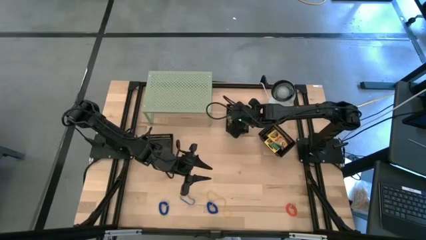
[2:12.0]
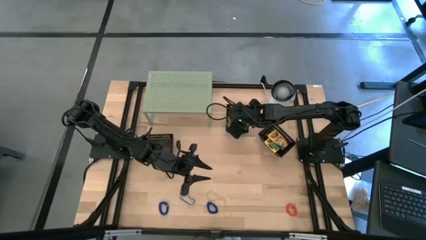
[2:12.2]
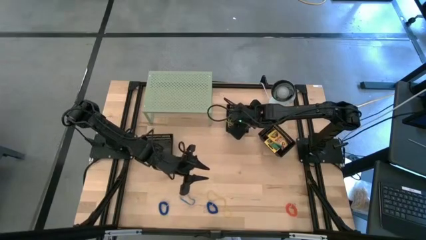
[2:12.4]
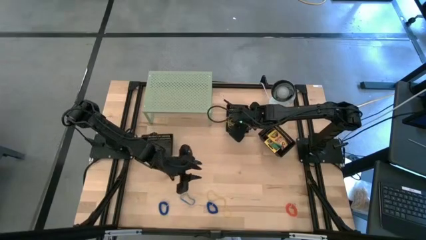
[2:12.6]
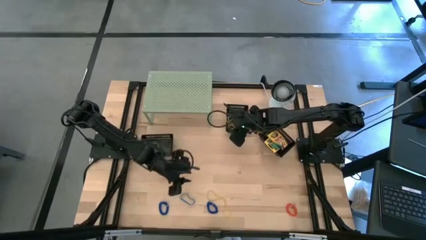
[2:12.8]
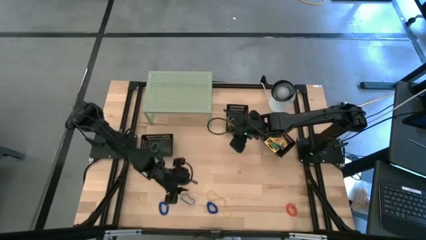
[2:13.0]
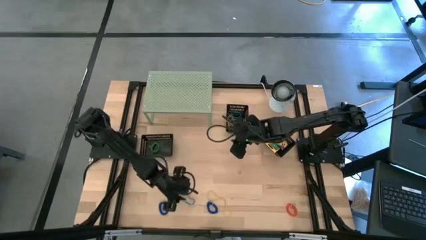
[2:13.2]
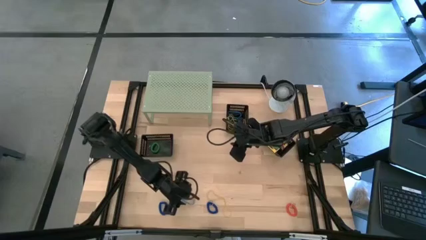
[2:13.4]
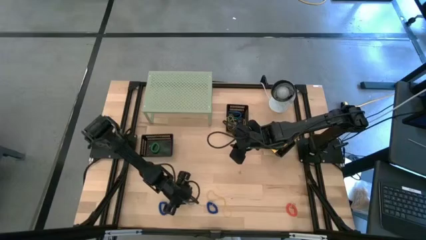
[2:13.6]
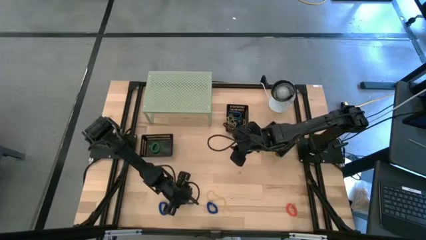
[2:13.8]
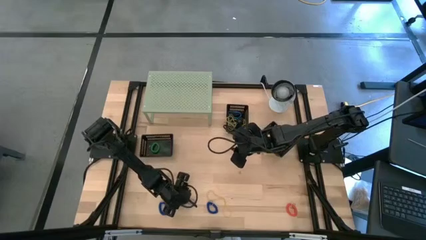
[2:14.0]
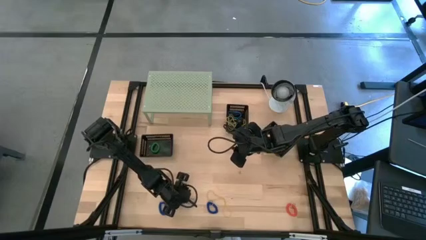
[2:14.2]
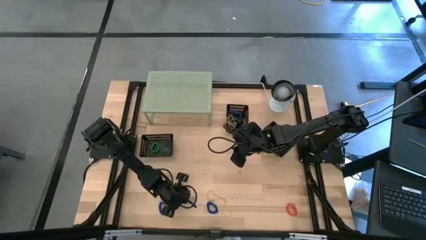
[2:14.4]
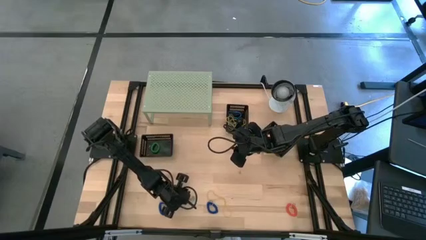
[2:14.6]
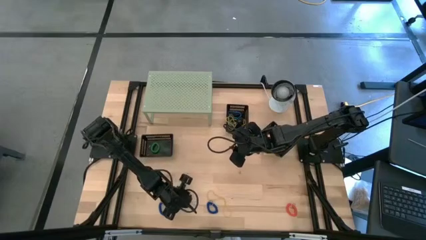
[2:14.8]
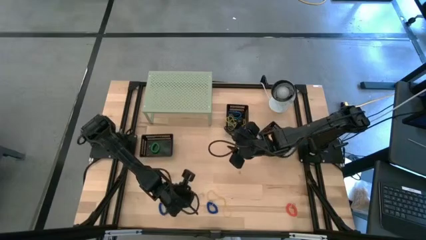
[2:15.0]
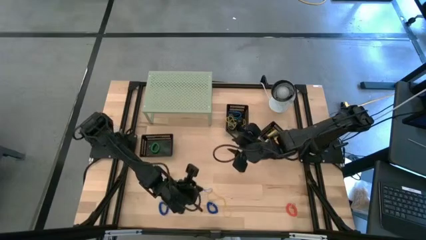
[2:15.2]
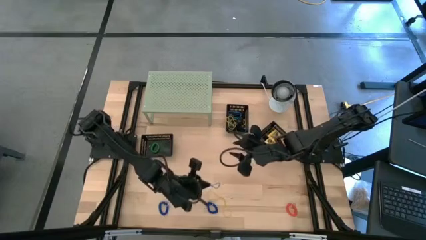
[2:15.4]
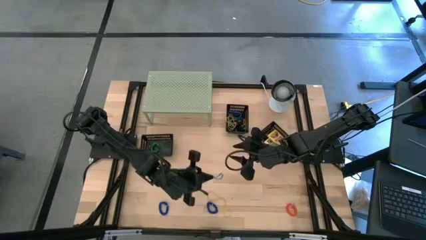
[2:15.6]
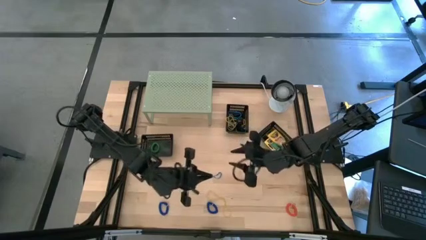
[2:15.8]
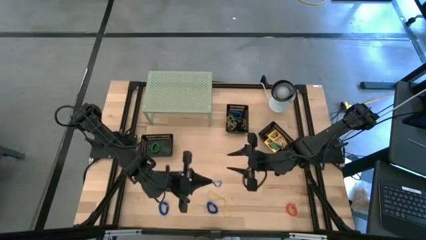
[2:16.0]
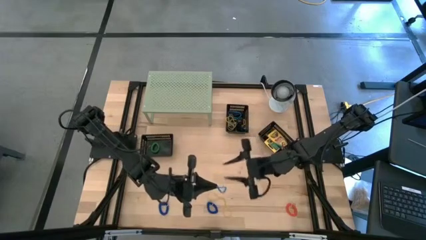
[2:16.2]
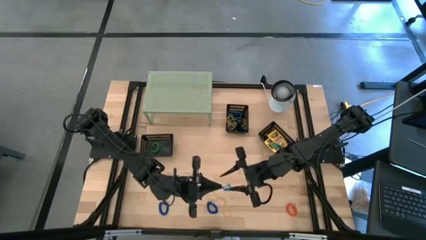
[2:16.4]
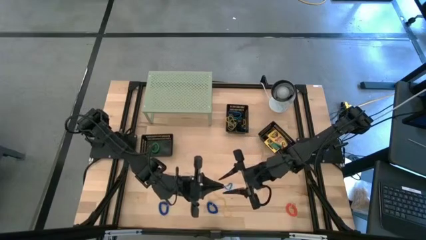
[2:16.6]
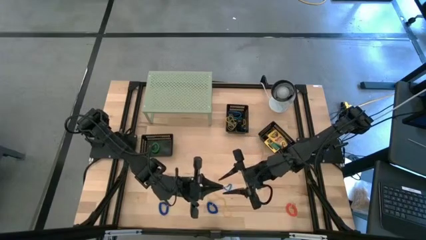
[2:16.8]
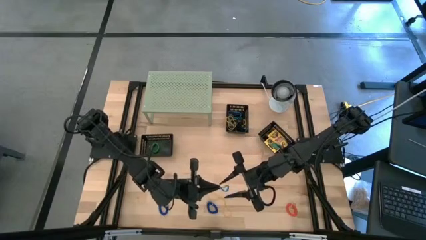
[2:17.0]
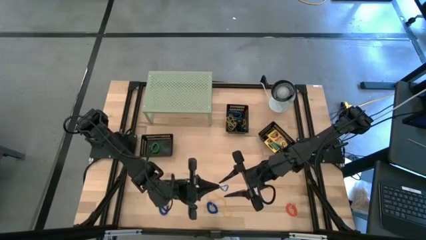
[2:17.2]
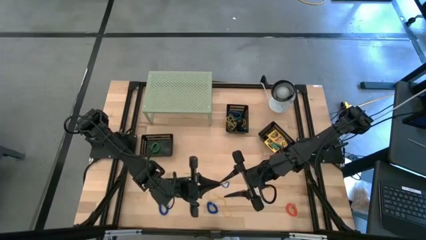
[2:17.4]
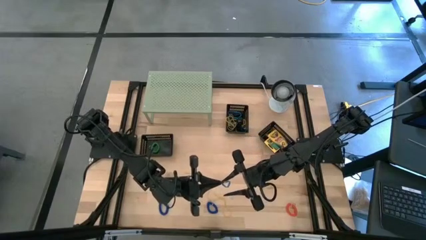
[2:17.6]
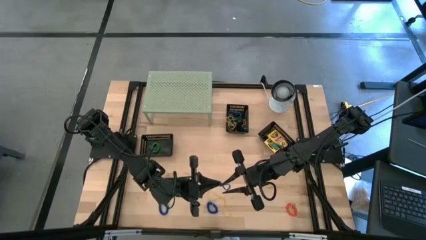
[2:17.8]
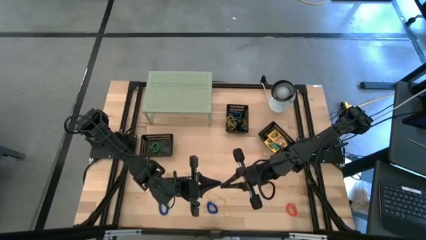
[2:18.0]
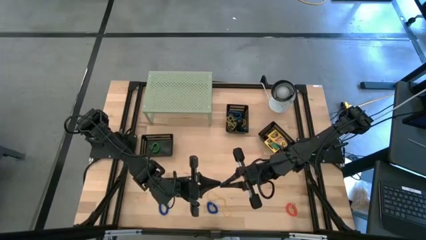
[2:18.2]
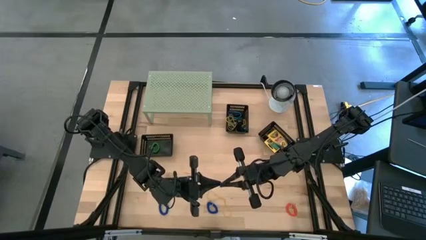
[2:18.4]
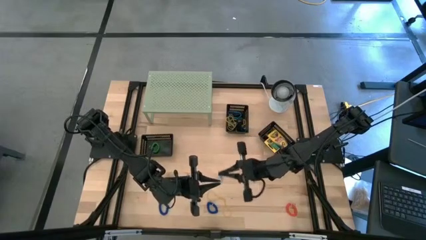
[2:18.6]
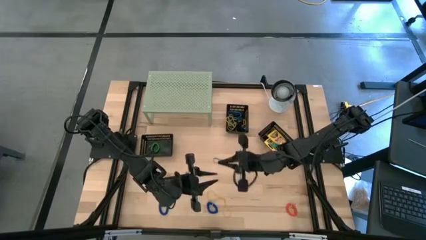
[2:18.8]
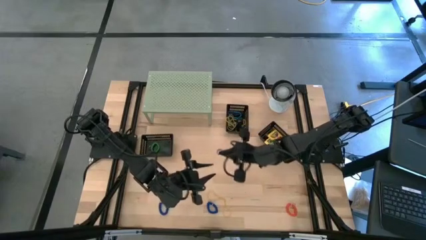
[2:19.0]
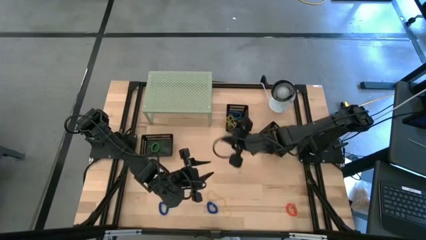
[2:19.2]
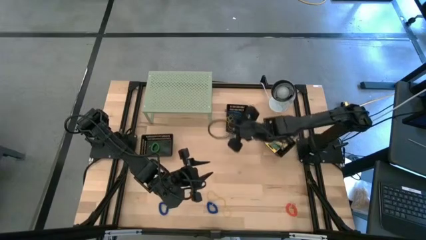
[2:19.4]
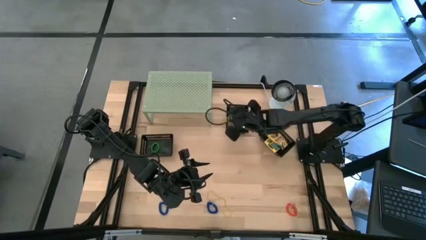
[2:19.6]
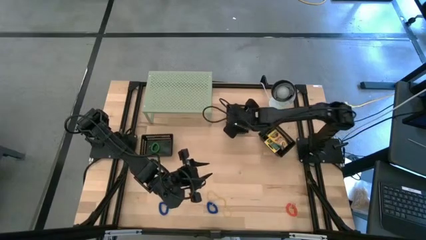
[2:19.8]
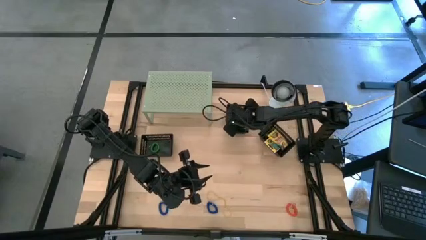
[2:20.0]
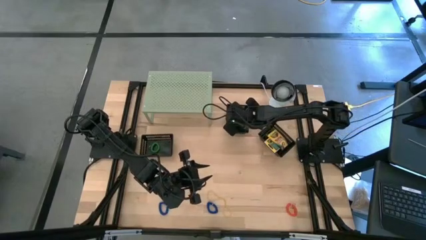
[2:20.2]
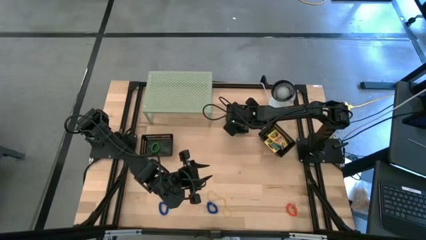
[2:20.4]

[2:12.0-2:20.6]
Task: Pick & Place Office Desk Supplies
Put the blue rubber band into the top black bin

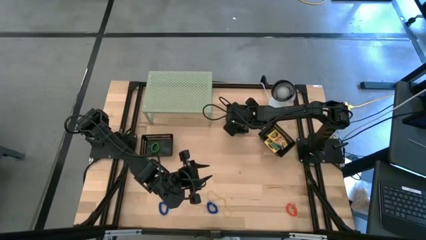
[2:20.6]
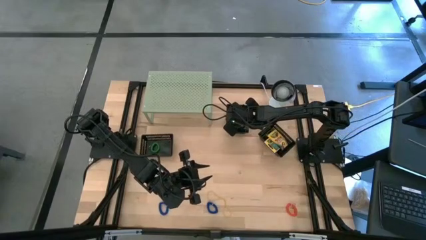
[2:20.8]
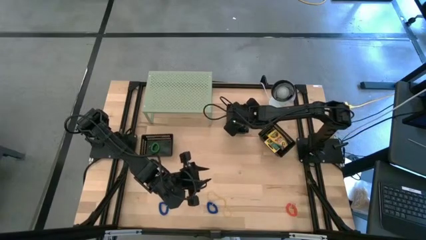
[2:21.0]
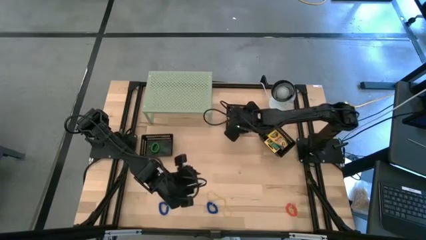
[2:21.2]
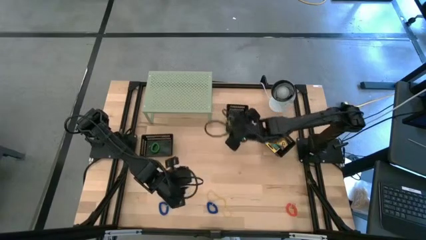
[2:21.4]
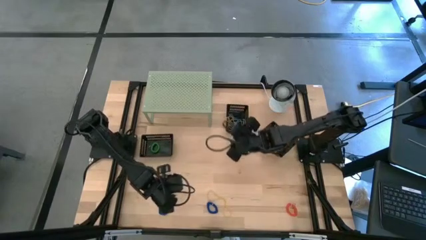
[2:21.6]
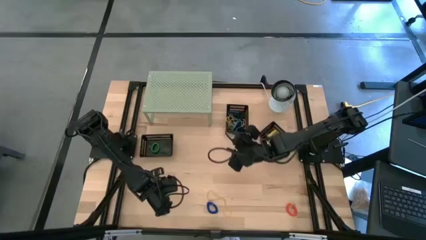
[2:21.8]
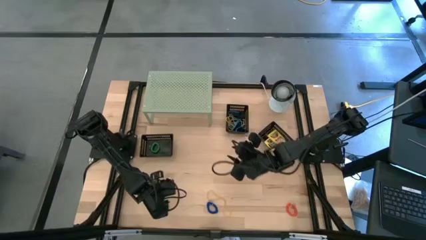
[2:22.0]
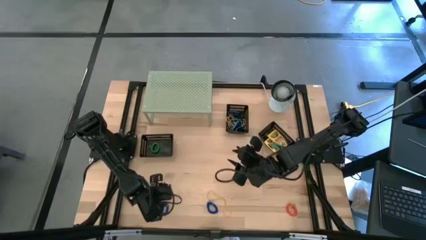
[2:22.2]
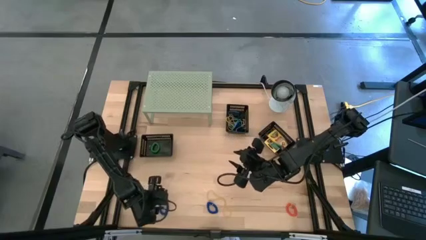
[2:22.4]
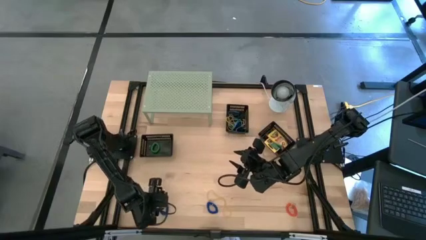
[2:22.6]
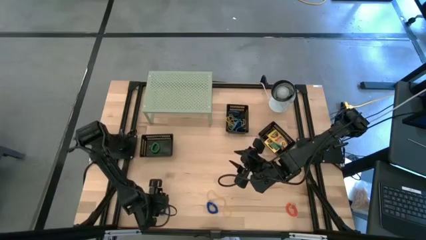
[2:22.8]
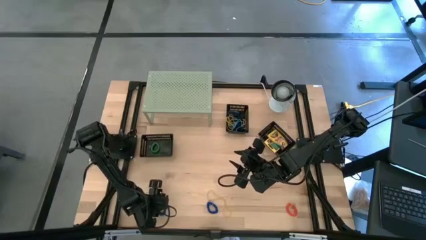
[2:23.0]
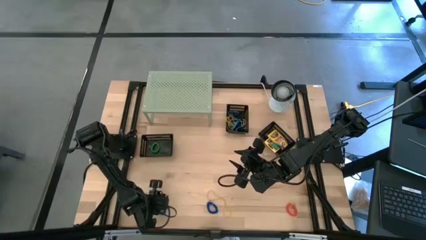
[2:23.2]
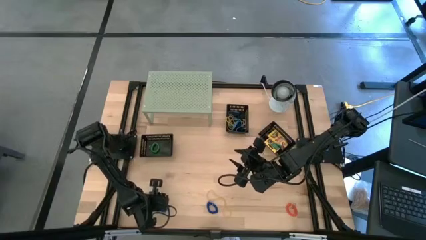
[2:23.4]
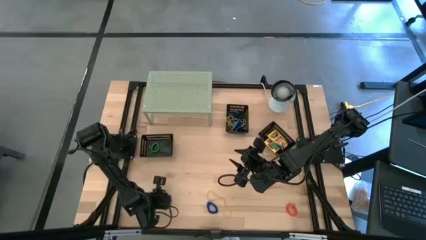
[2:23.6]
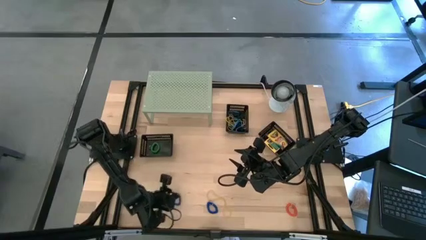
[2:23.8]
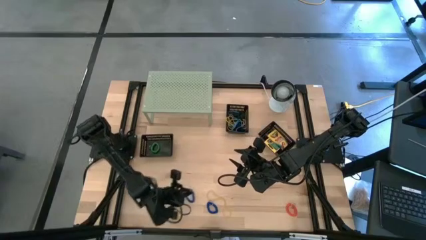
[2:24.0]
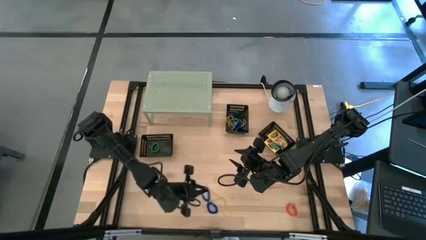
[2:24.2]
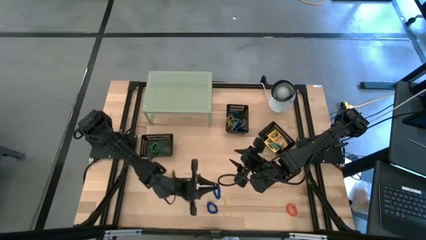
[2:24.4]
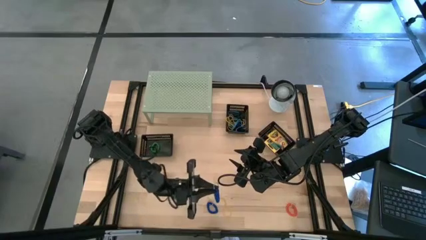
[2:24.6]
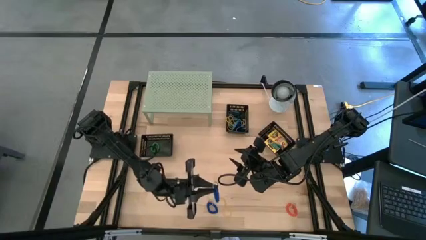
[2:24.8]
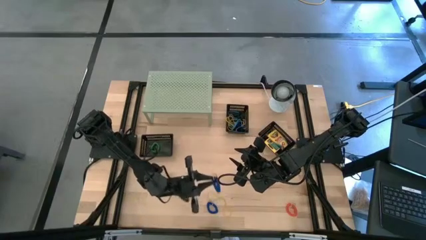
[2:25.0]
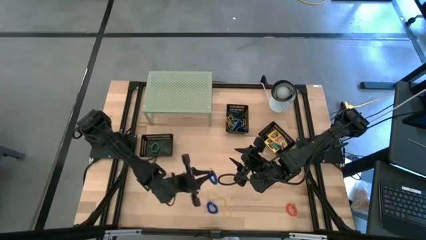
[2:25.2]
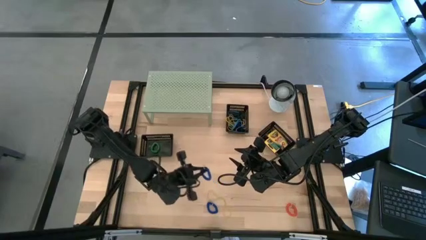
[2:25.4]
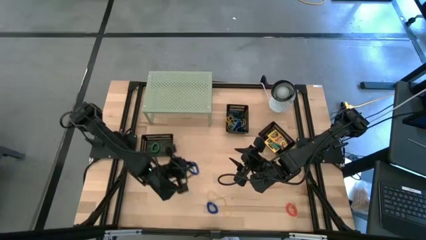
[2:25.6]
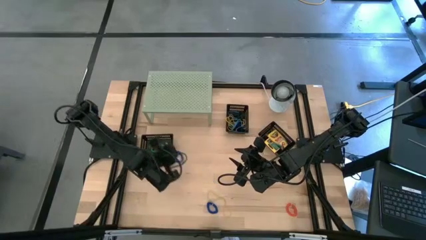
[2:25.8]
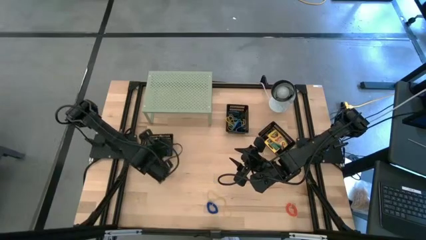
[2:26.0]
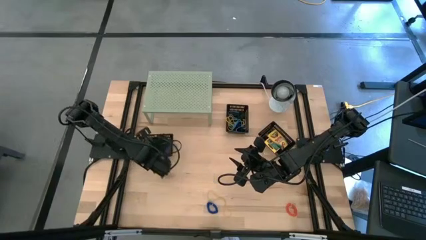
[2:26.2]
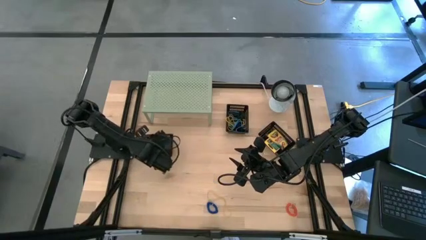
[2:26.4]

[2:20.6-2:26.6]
Put the blue spring rubber band into the left black bin

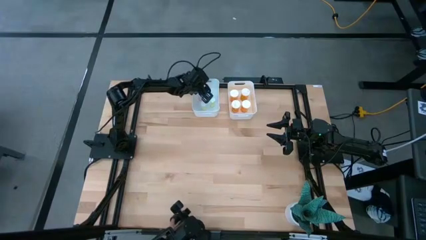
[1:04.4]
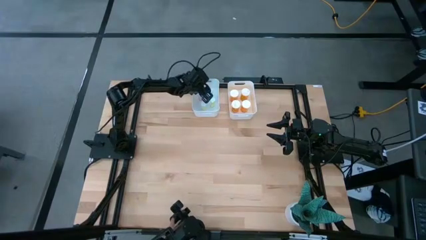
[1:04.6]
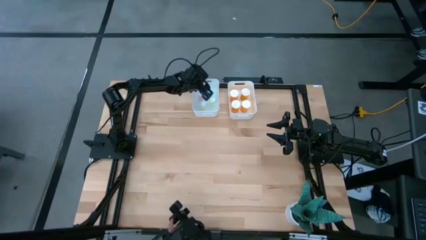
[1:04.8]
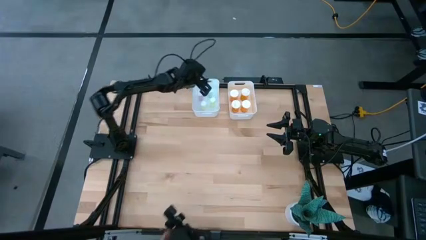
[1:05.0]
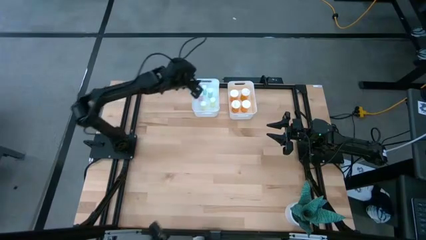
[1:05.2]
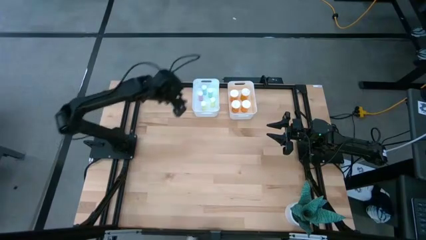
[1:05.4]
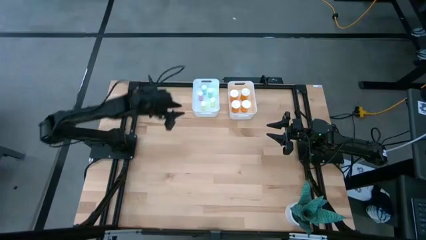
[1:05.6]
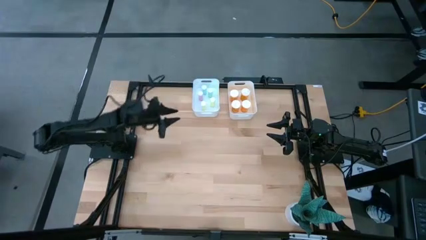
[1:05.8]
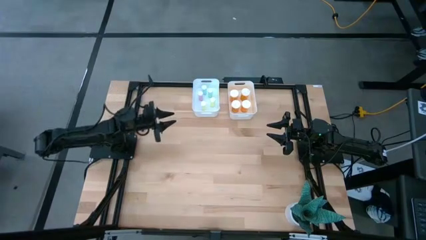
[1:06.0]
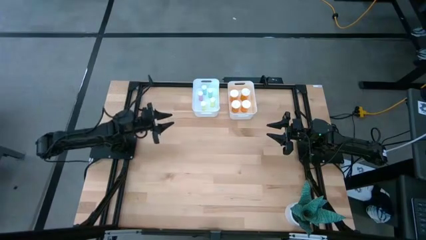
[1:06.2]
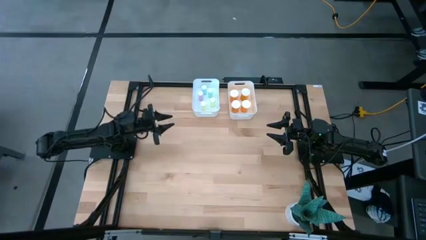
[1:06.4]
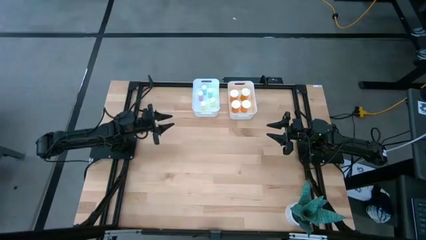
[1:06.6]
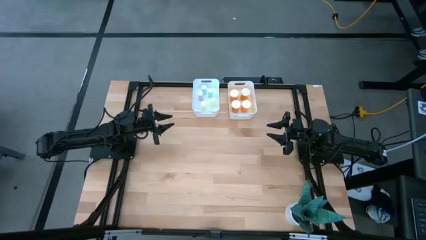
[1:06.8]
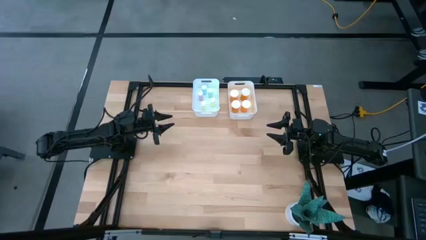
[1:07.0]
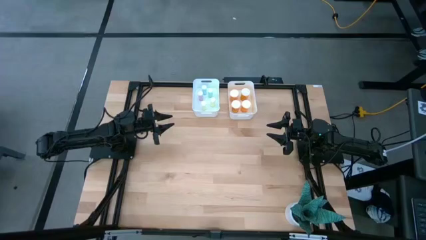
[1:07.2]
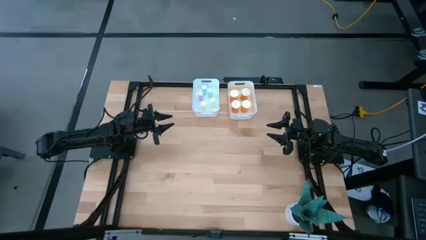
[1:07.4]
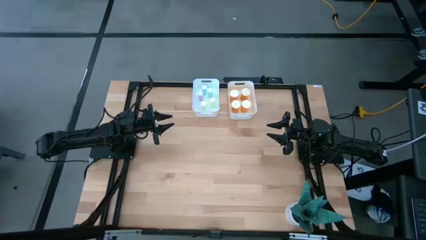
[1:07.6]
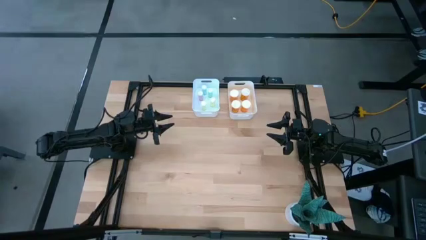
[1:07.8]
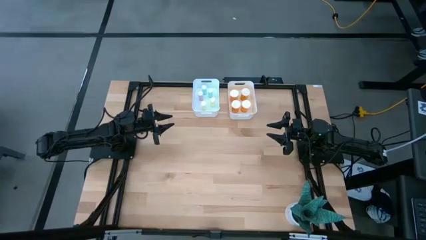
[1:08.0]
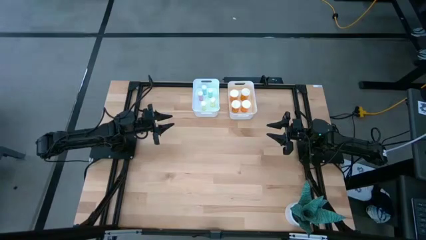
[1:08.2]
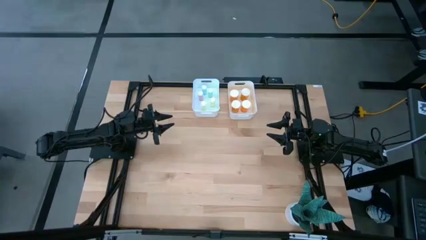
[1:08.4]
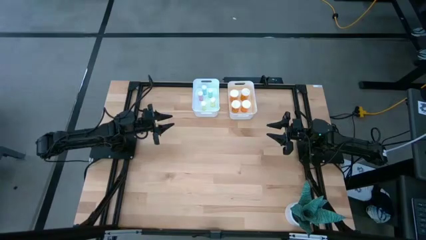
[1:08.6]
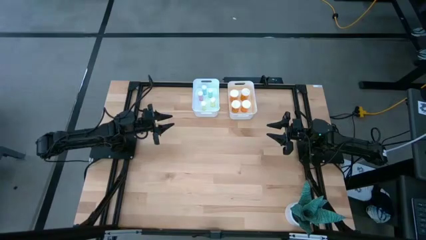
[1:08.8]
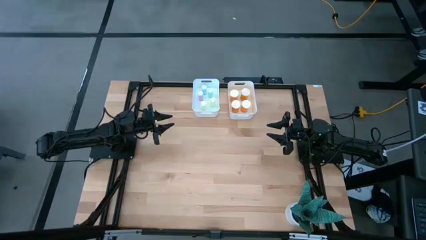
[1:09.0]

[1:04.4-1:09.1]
Task: Pick and place medicine bottles into bin by pill shape (circle, oval)
Return to Home Position
